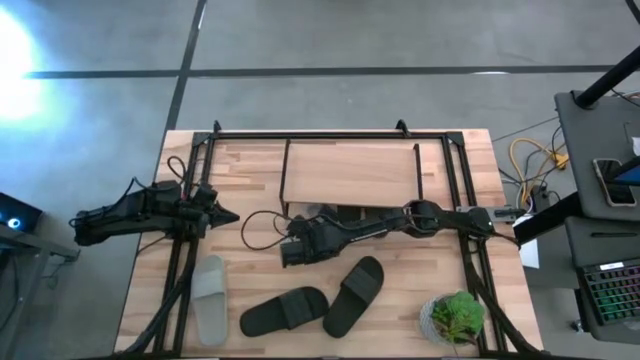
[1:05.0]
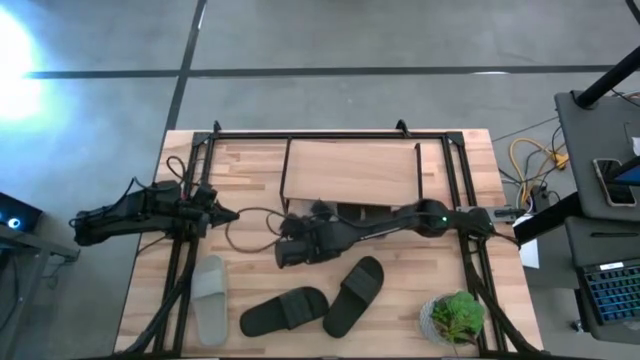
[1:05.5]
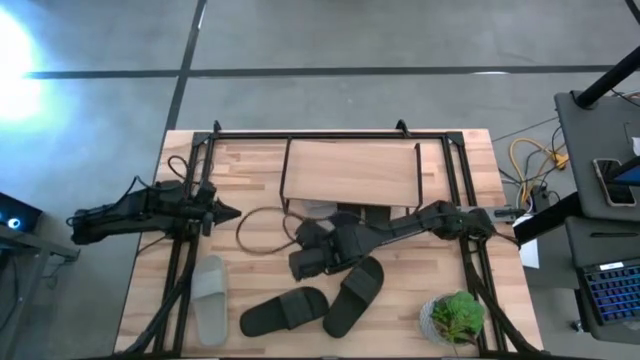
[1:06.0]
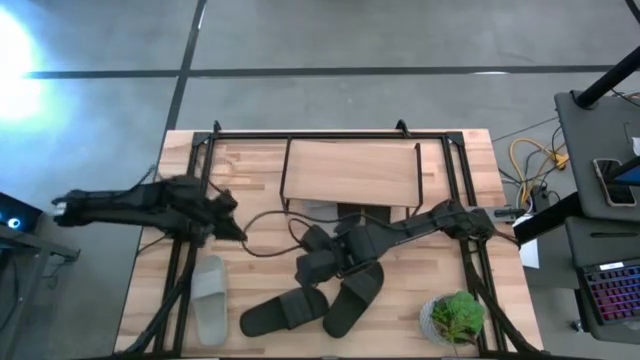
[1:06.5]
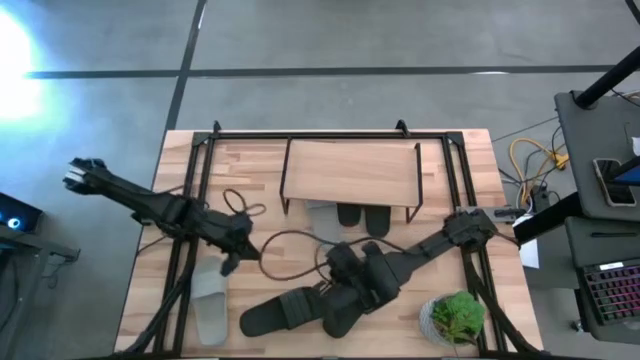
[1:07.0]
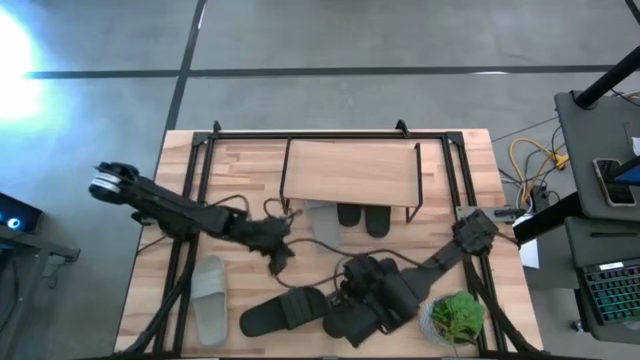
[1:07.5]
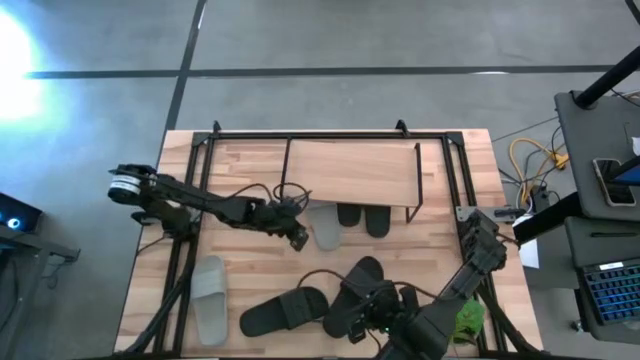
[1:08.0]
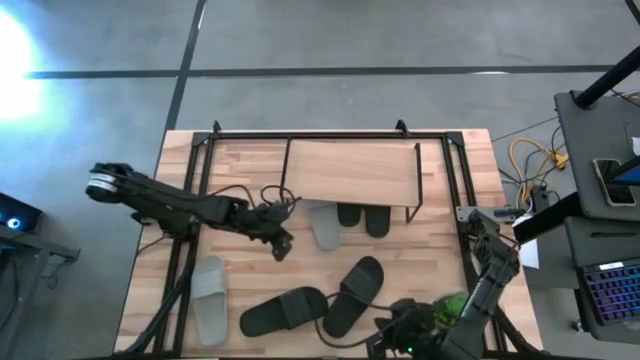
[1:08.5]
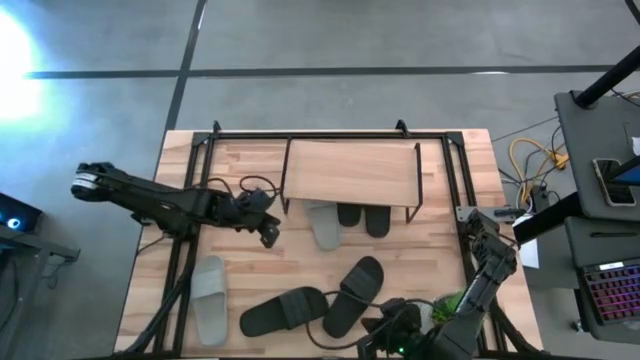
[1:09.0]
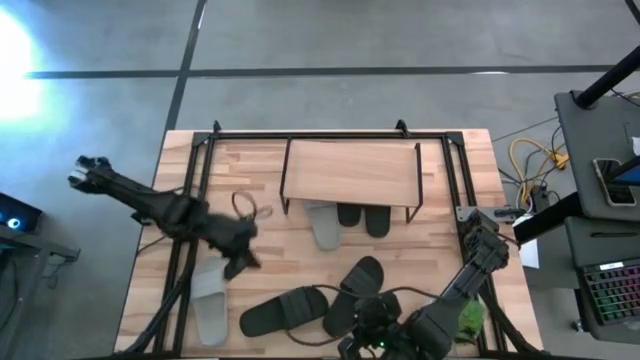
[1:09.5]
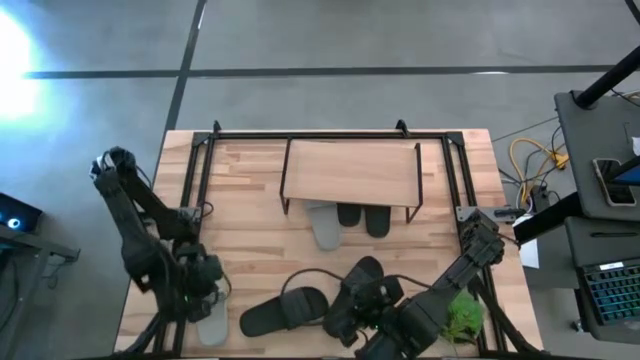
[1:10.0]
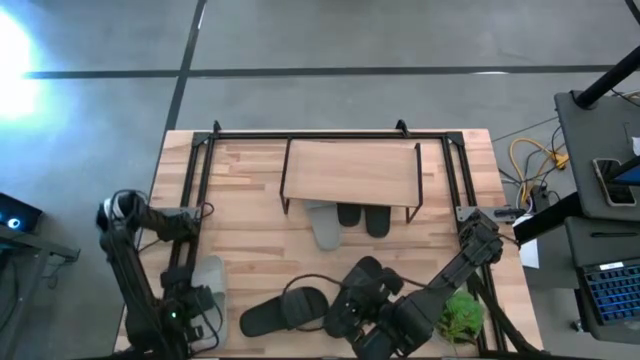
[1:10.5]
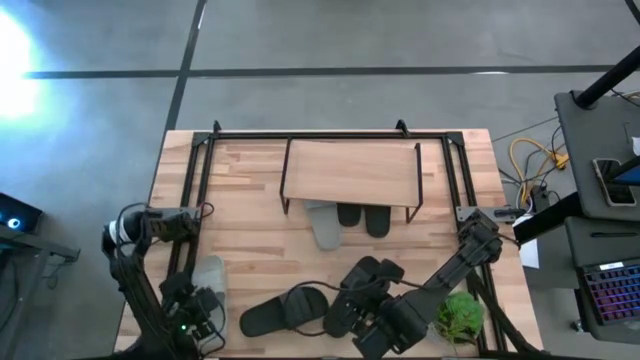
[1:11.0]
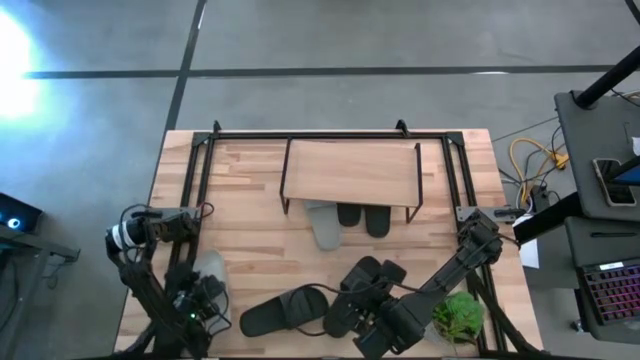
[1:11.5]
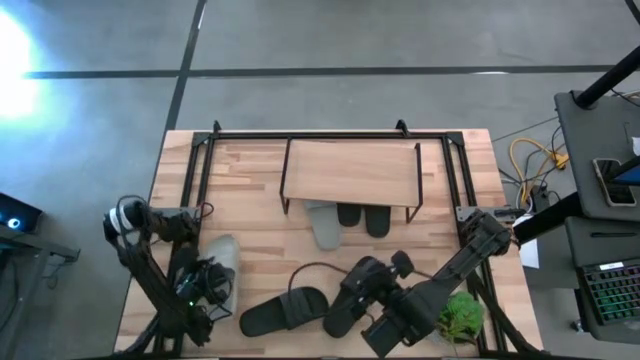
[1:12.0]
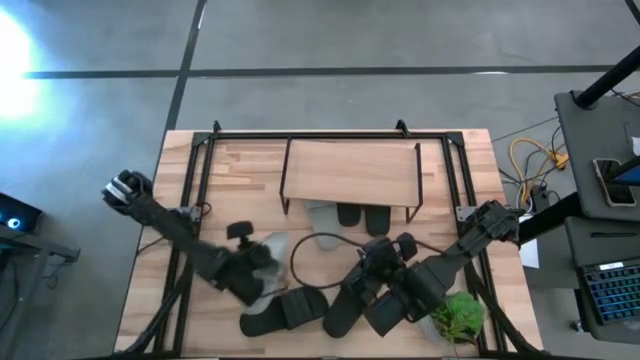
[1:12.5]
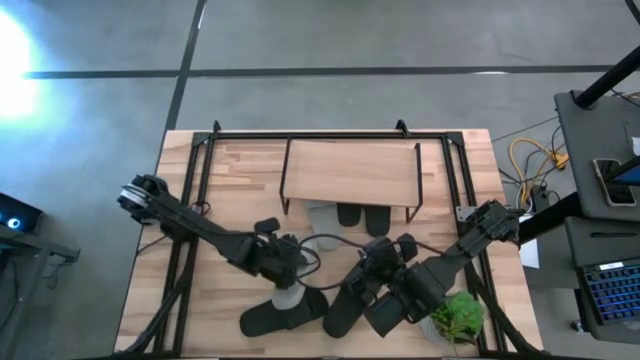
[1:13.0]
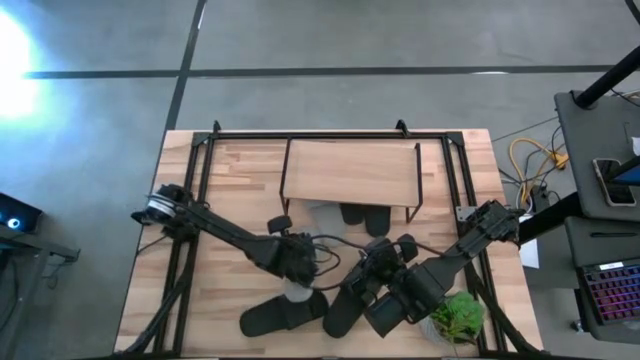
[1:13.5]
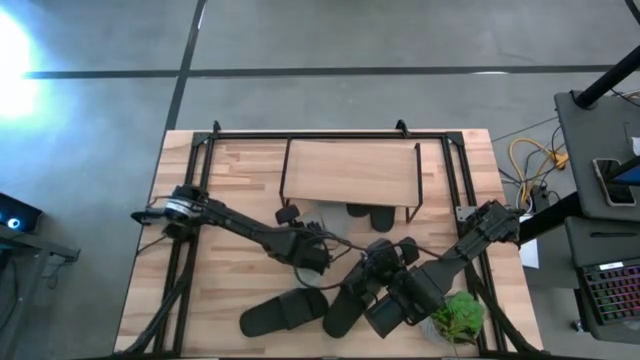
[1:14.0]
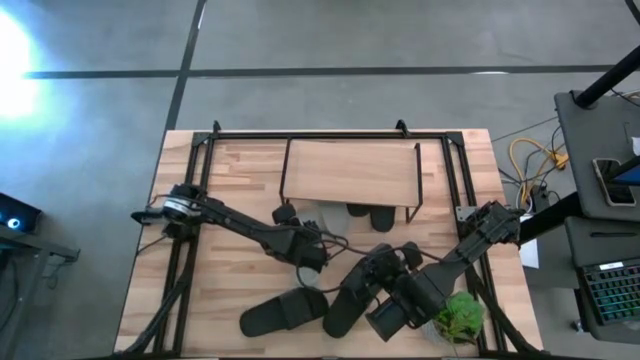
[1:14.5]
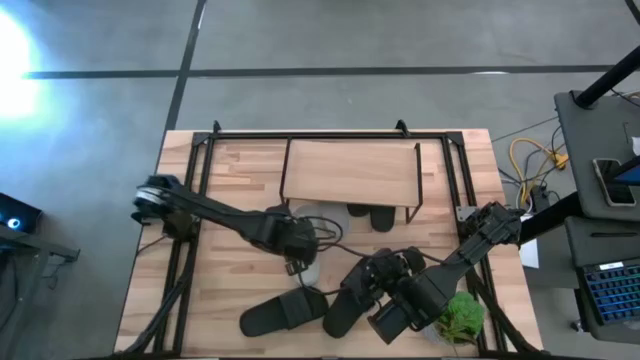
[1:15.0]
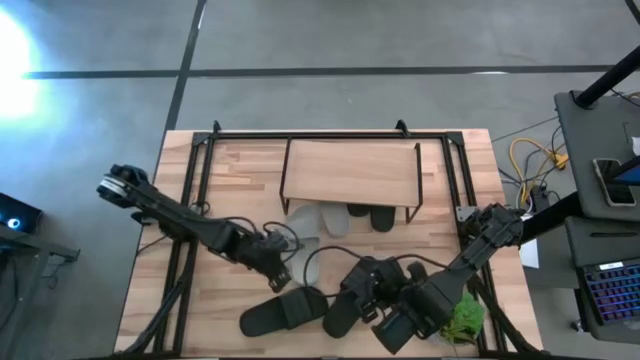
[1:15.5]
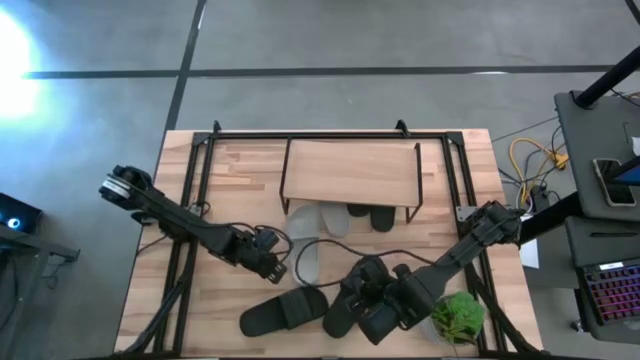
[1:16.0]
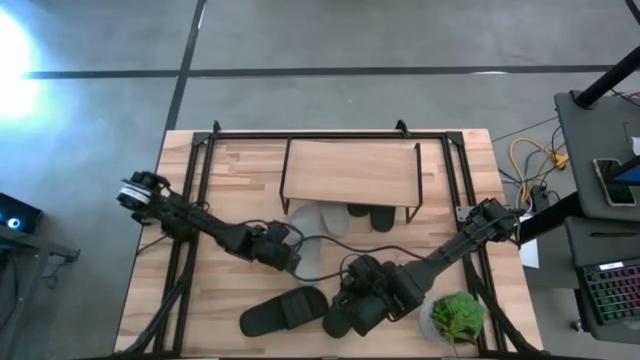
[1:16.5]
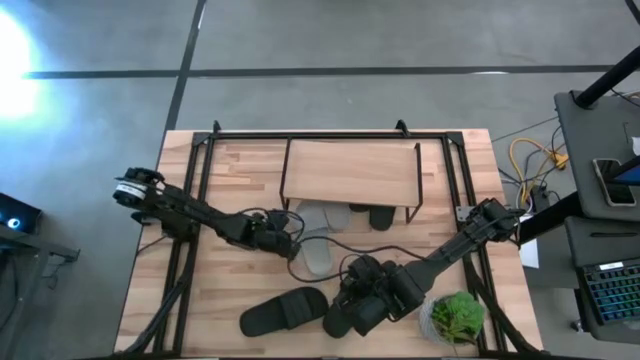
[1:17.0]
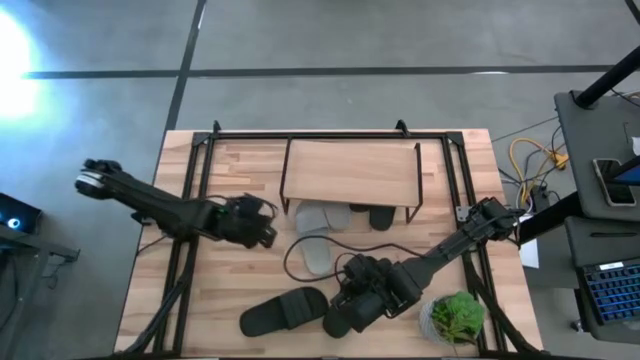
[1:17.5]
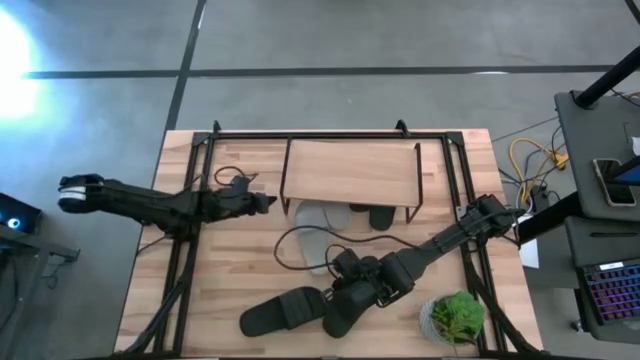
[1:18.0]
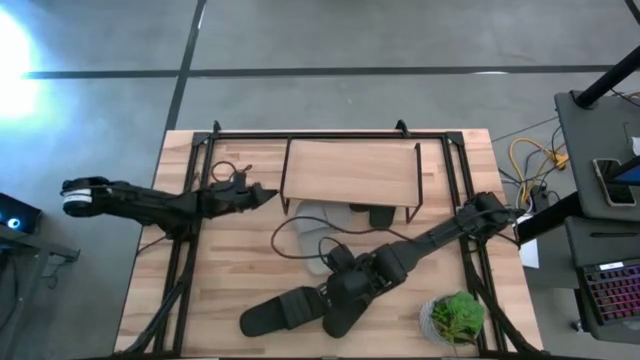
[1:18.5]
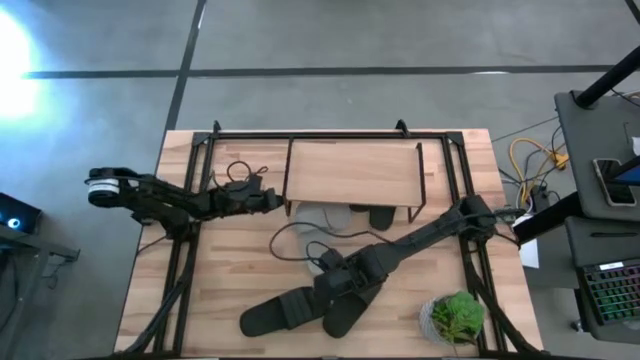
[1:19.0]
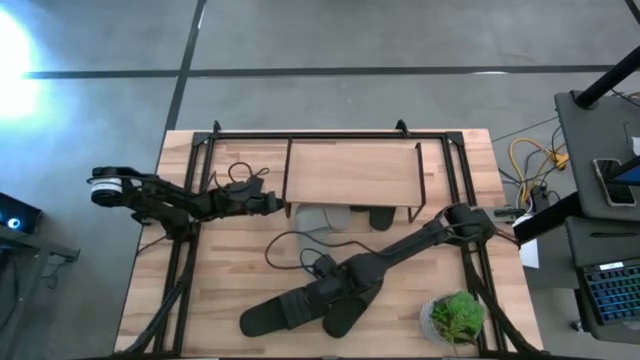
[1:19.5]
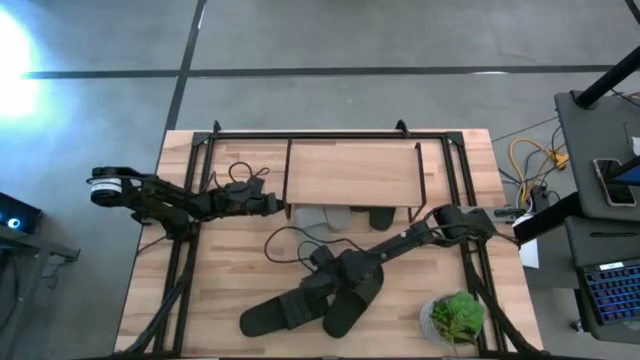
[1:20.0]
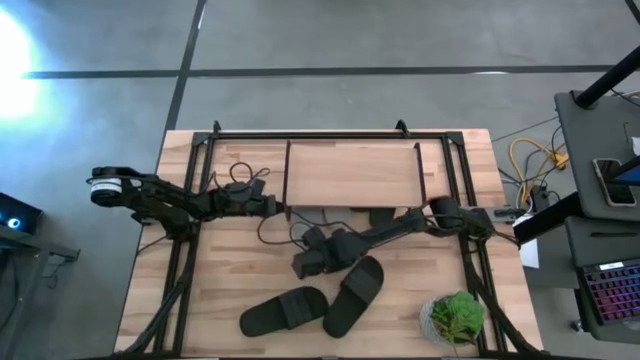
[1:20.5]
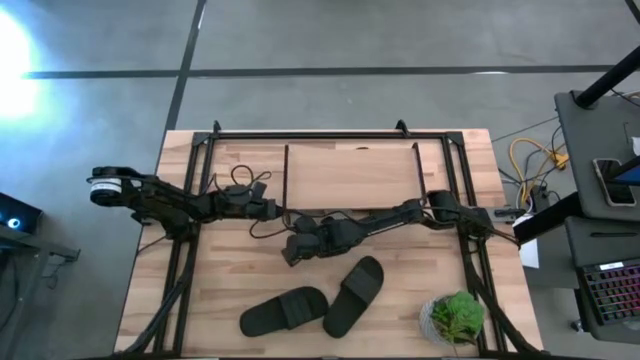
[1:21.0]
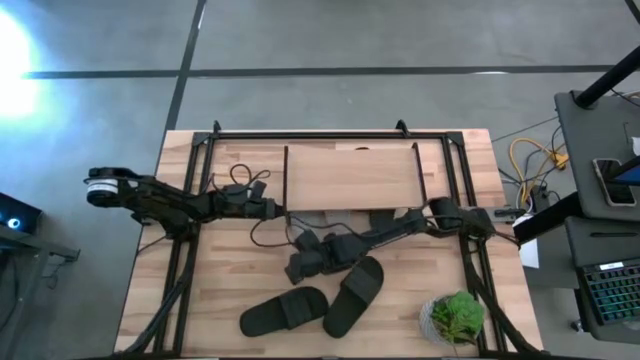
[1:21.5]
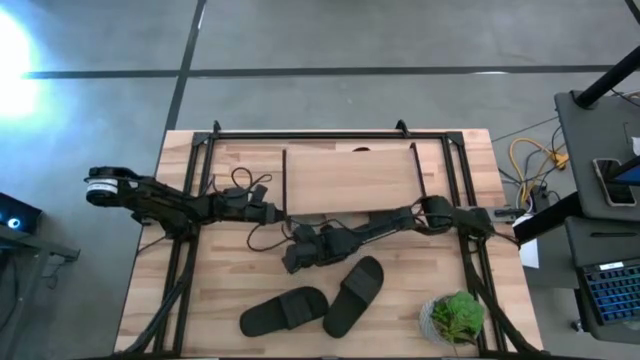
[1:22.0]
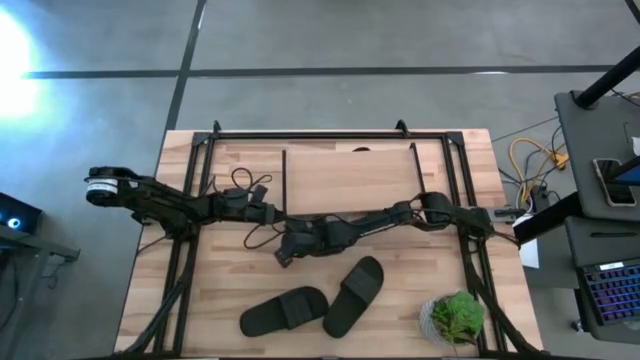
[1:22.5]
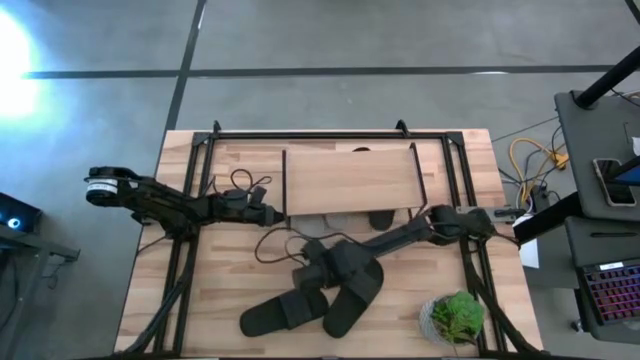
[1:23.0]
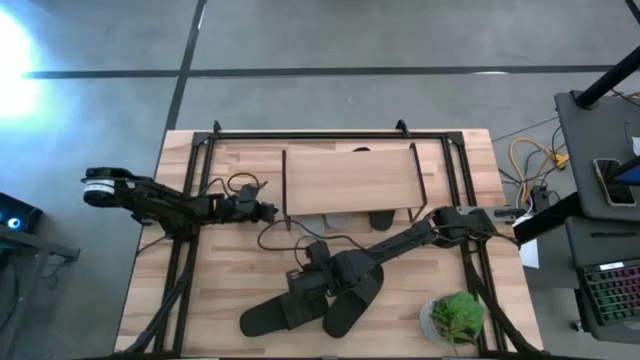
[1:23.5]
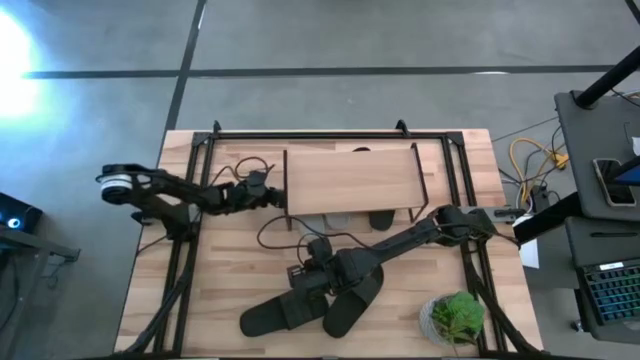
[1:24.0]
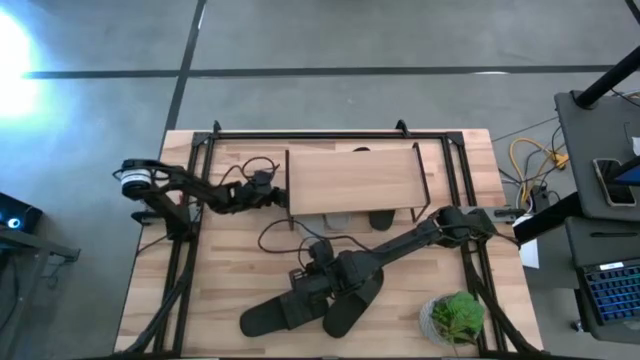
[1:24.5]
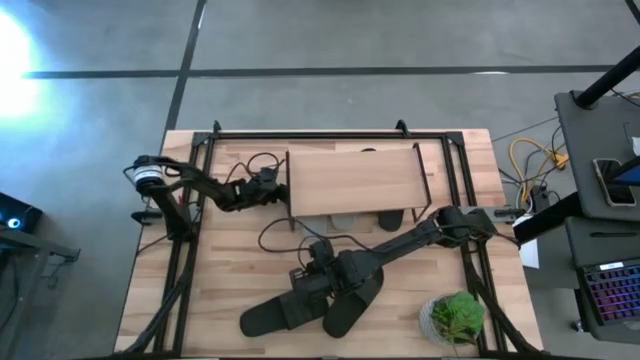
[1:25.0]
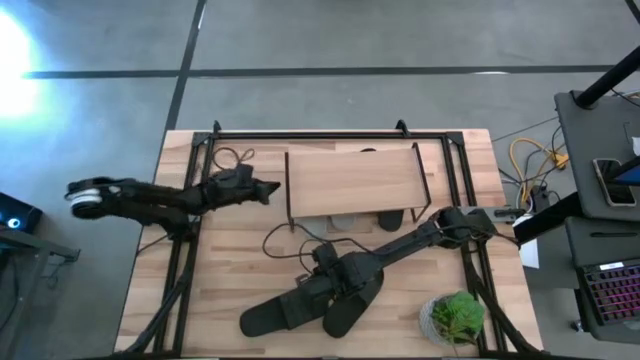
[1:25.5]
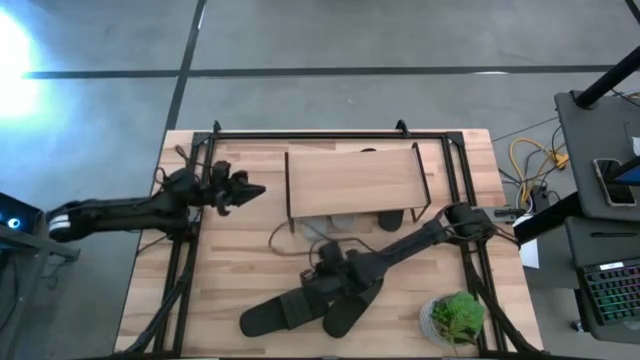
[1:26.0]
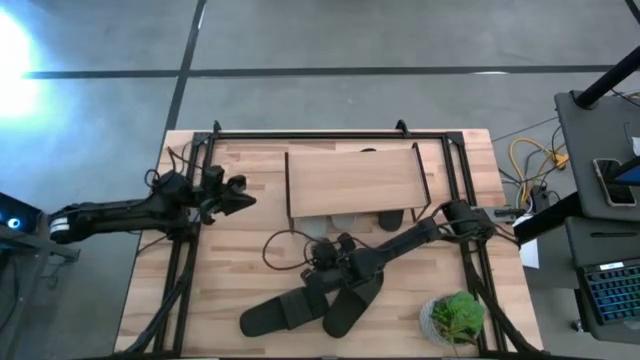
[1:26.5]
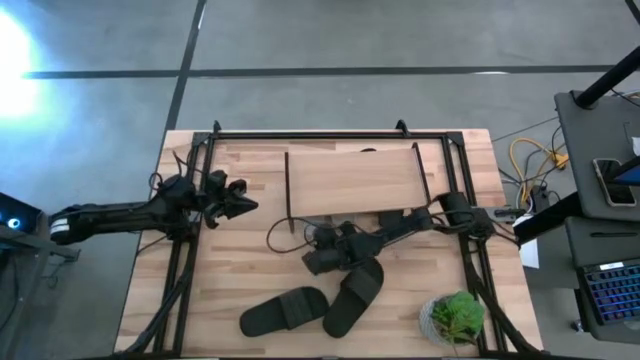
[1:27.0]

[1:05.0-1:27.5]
Task: Pick and place slides into the shelf
Put the gray slipper under the shelf
